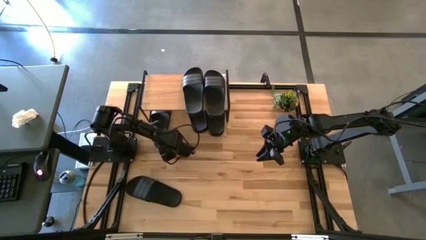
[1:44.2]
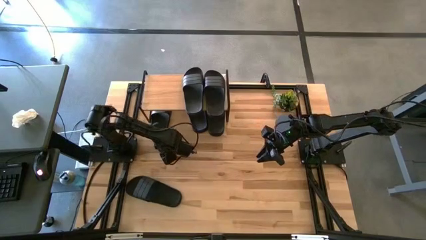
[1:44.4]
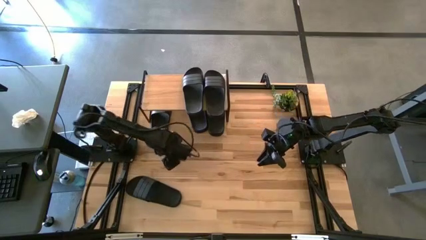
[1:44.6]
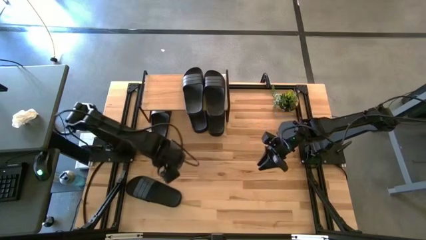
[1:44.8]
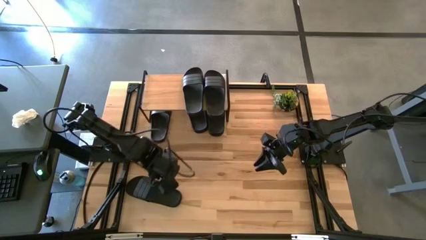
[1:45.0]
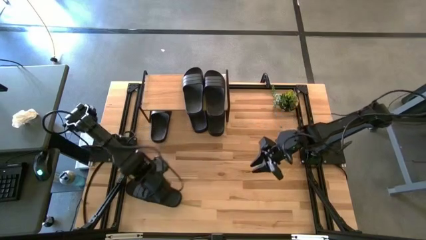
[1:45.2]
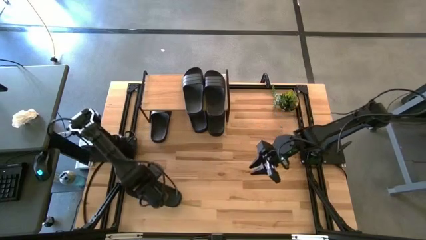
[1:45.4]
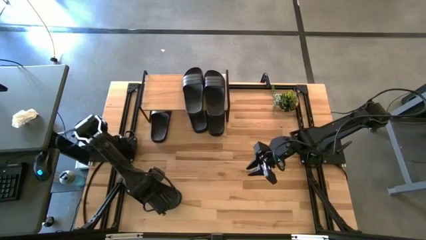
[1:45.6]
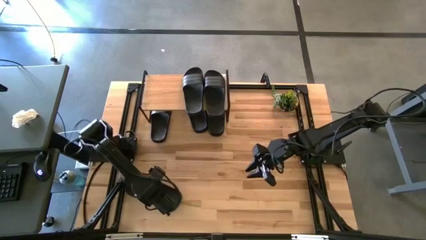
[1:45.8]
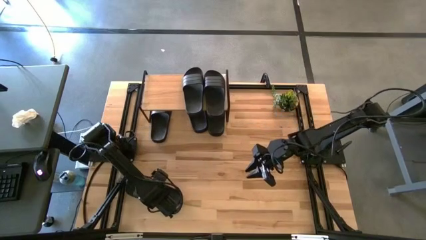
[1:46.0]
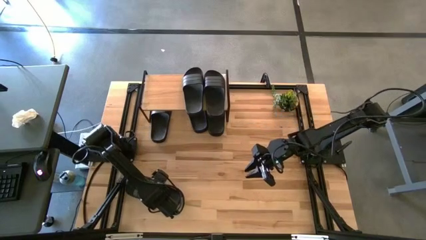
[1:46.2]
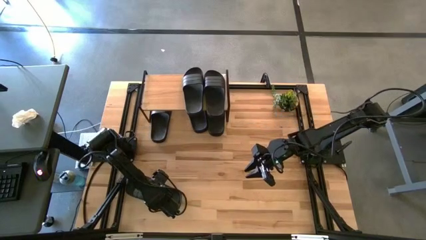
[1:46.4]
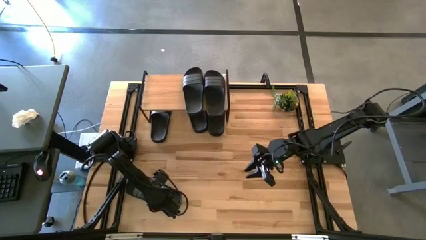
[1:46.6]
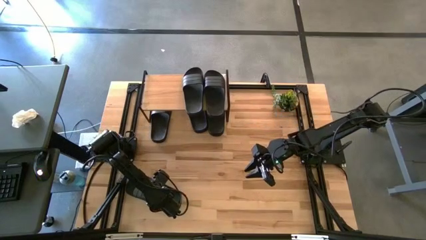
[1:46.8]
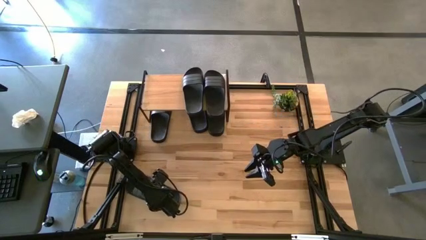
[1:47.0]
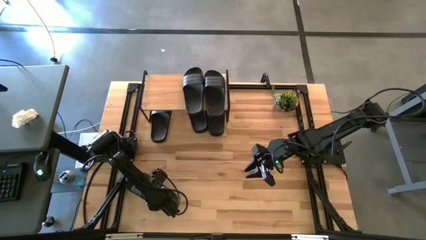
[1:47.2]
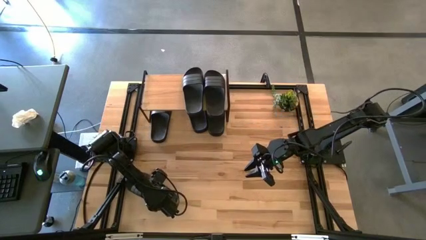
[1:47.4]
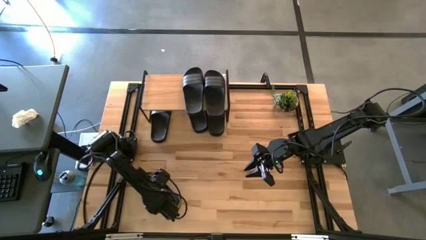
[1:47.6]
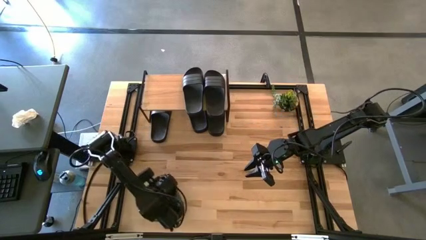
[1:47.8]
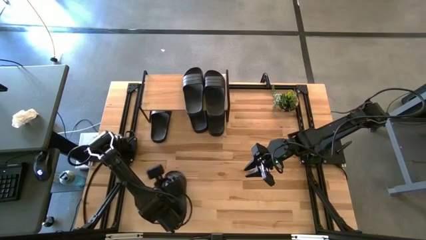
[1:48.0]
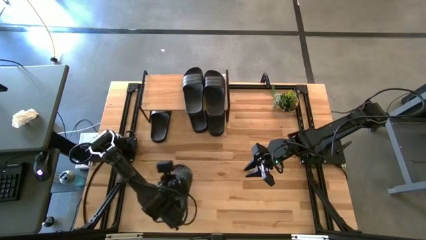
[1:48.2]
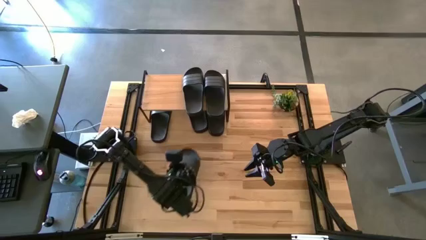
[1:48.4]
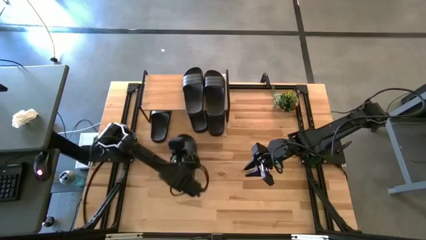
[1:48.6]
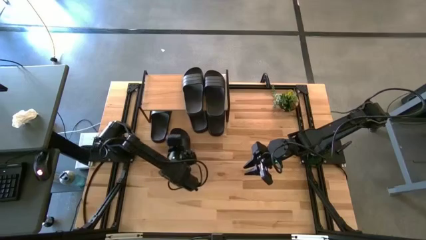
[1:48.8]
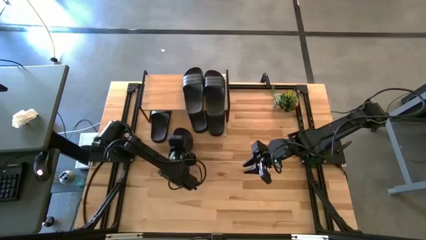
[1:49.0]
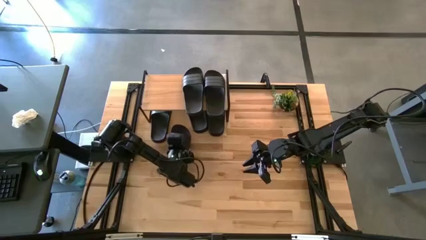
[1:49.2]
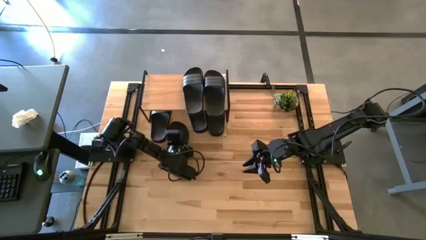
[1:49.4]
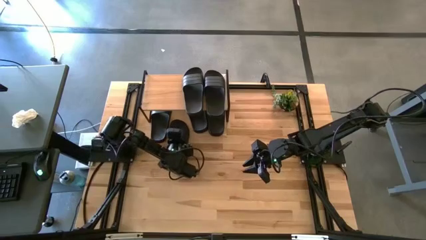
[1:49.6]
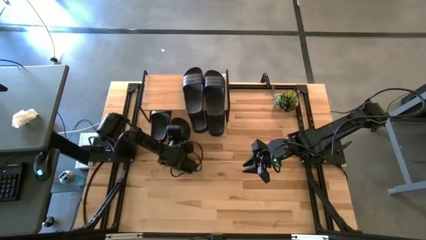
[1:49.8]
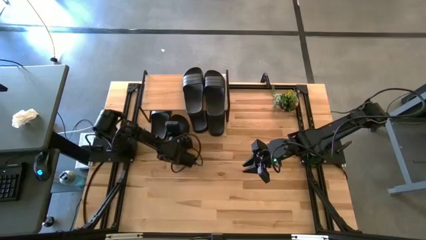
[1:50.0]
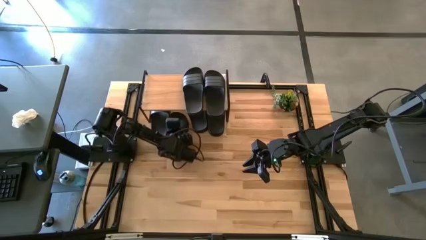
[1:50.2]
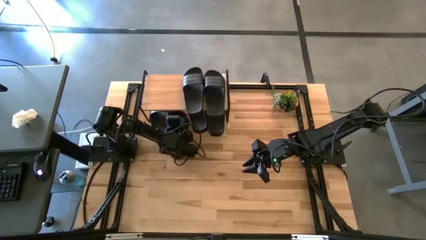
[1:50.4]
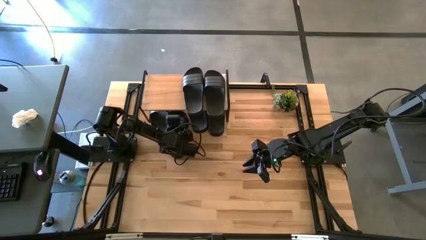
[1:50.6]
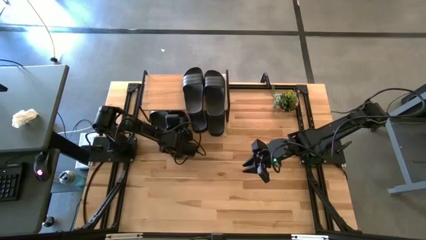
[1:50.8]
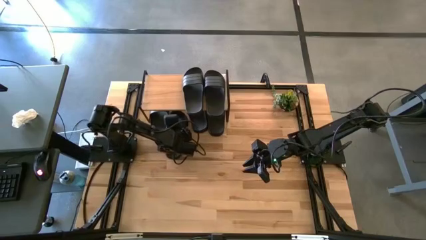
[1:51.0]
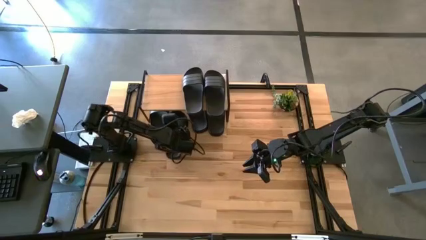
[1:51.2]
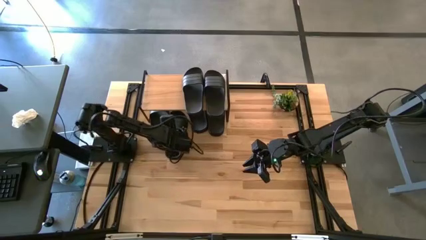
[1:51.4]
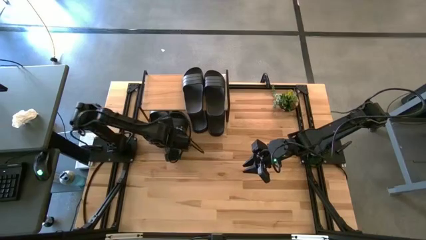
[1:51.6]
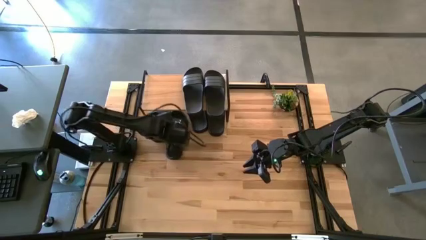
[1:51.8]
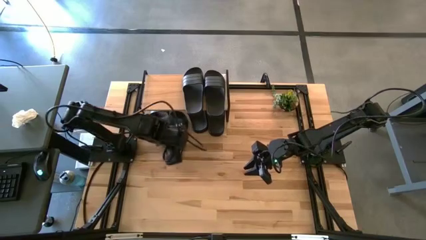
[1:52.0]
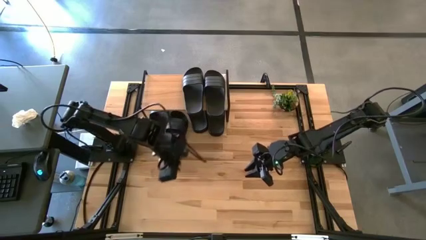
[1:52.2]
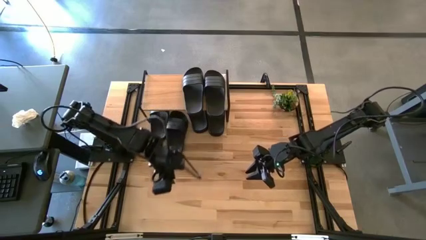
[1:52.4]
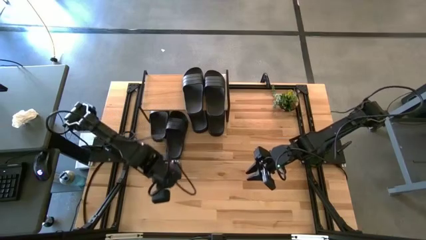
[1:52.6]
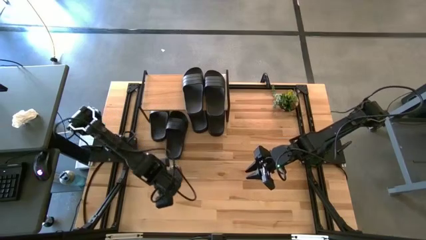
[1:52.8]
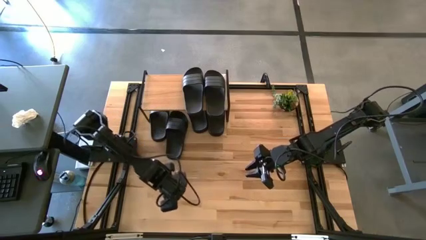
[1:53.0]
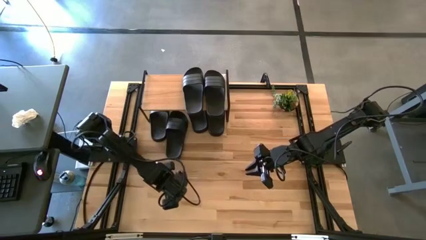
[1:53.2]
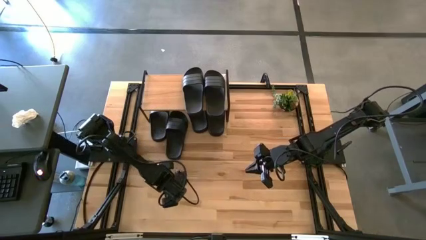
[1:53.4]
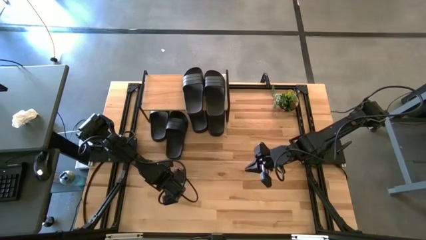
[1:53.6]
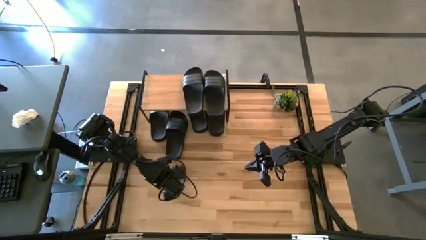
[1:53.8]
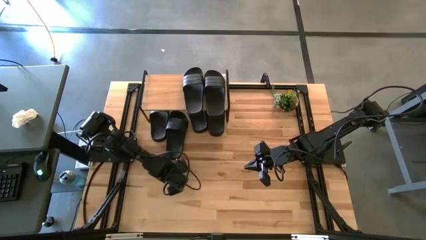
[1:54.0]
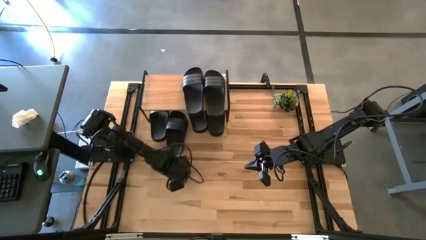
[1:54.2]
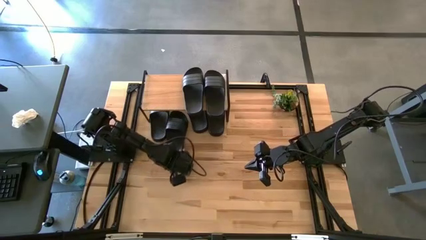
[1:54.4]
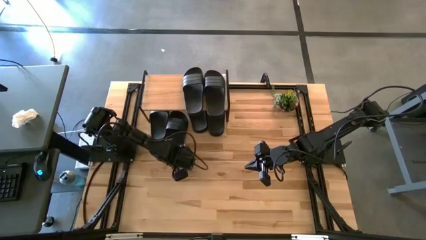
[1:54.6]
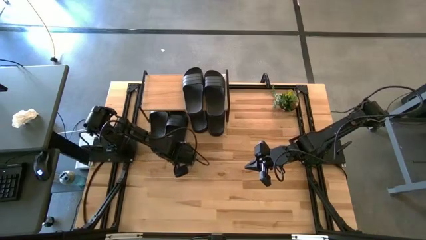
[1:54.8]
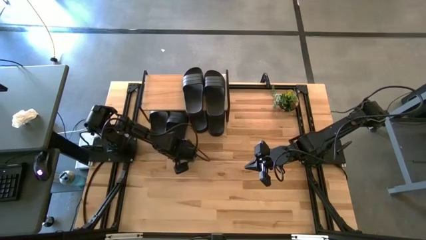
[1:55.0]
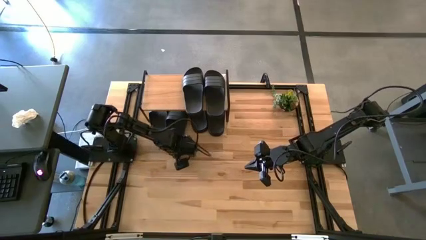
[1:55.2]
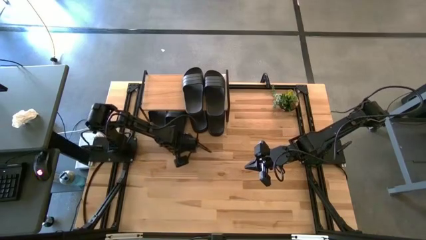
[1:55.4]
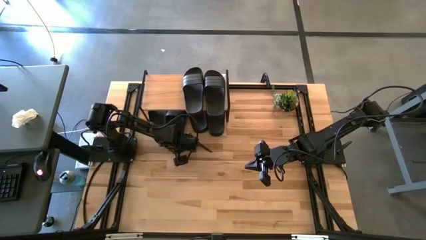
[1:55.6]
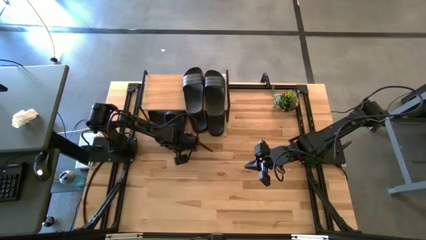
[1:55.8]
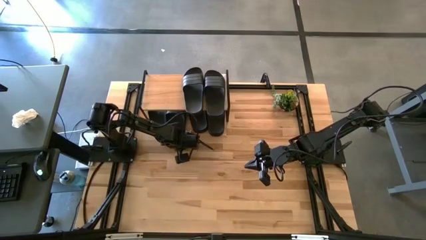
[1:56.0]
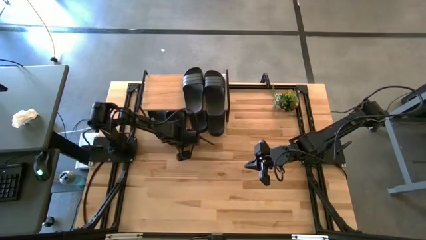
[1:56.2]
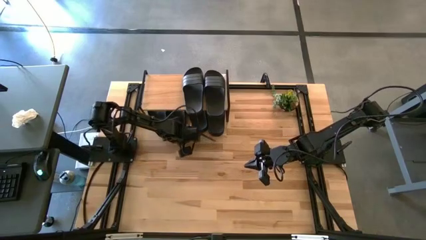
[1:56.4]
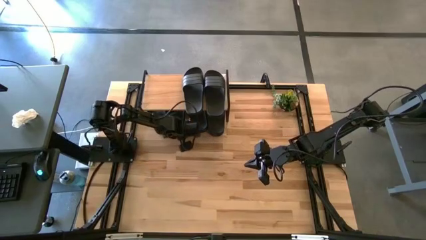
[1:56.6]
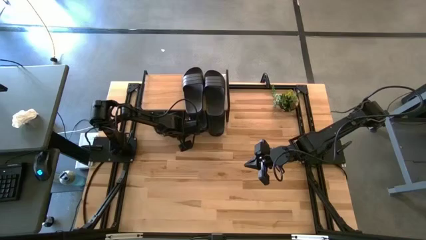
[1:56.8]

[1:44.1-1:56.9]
Task: Pick and place slides into the shelf
Put the black slipper under the shelf

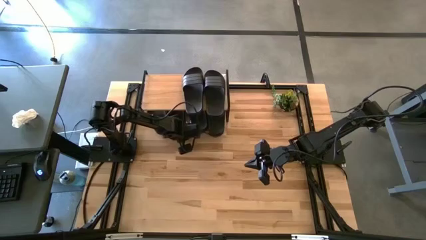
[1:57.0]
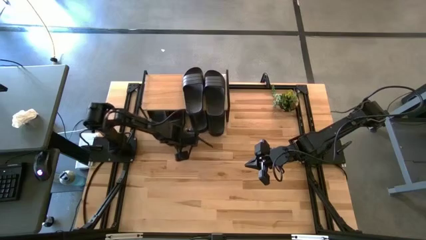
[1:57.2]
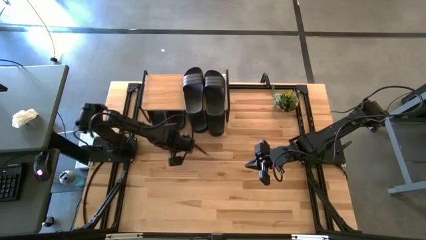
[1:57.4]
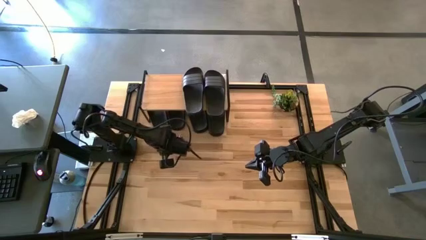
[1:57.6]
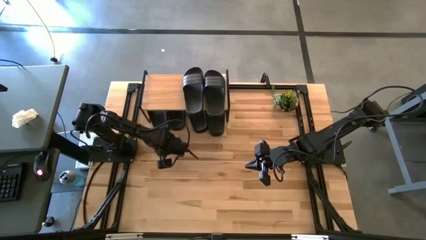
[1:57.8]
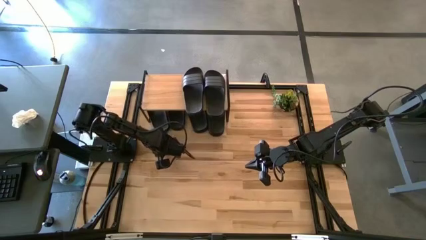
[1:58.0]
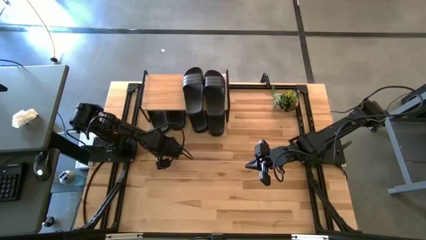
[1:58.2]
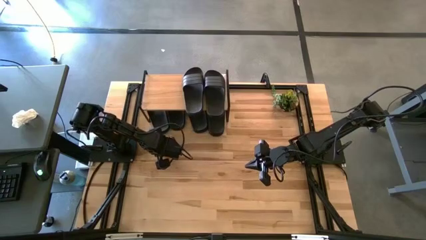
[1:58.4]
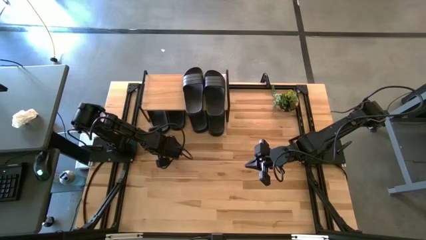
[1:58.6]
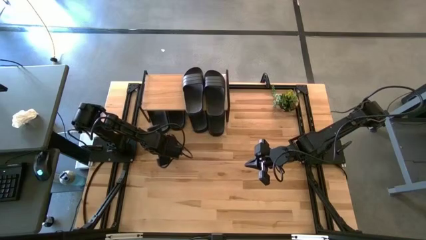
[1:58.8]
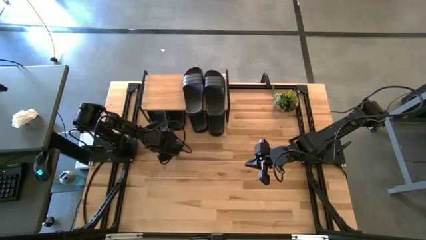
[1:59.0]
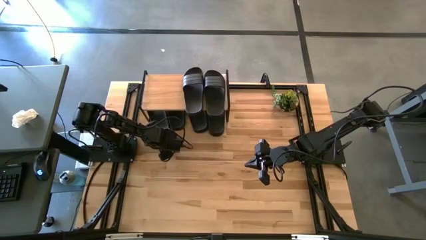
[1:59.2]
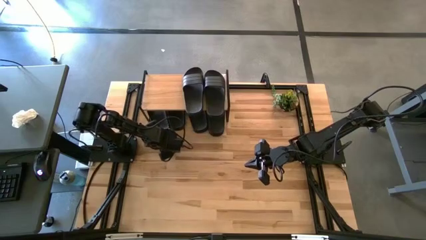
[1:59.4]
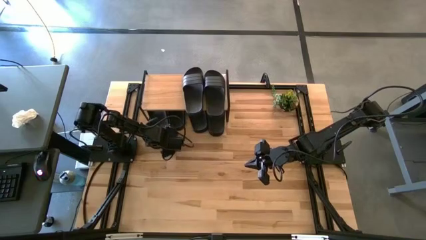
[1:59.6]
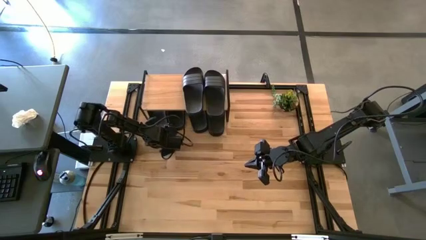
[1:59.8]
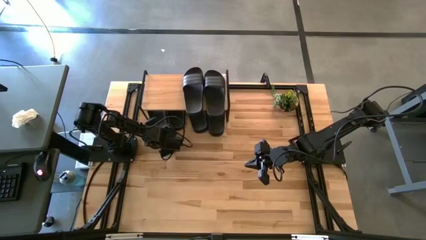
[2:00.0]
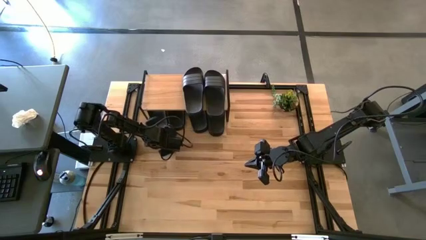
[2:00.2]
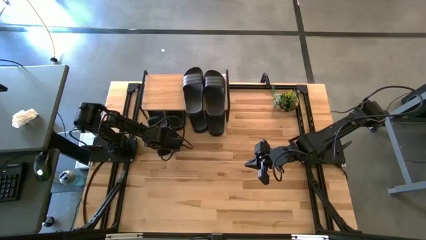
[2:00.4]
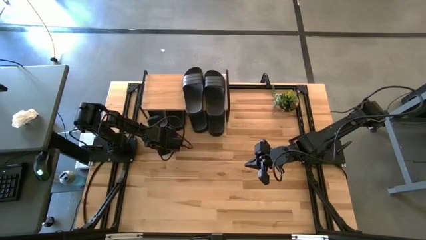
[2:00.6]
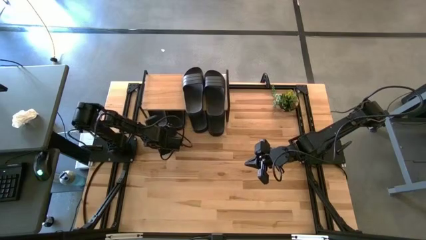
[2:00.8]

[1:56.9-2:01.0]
Adjust the black slipper under the shelf

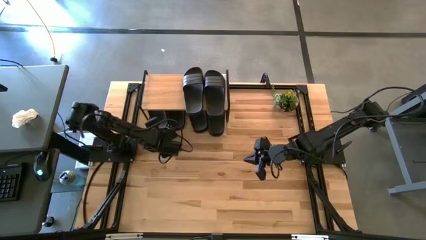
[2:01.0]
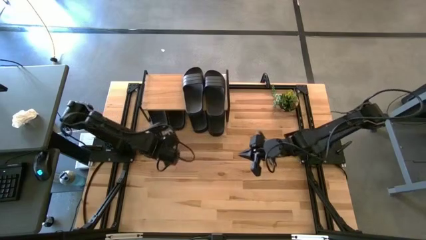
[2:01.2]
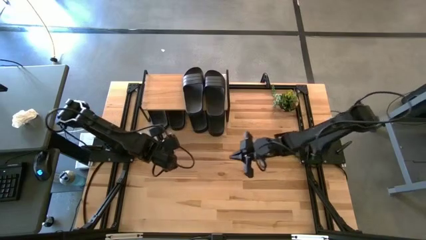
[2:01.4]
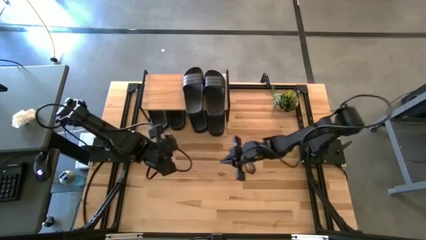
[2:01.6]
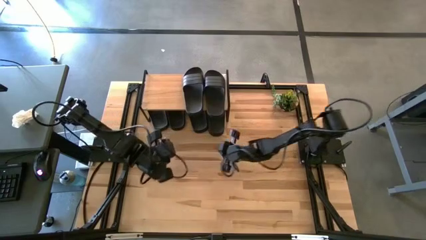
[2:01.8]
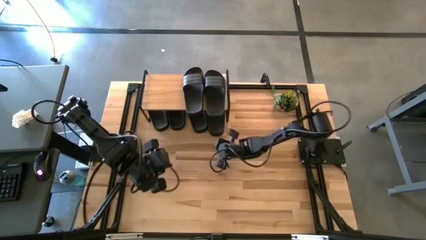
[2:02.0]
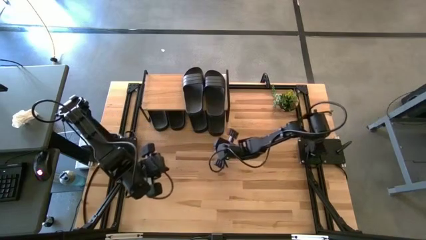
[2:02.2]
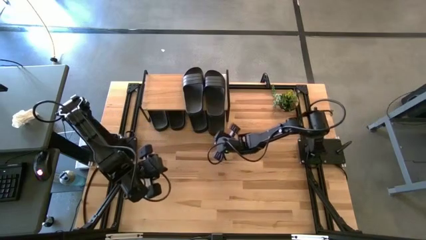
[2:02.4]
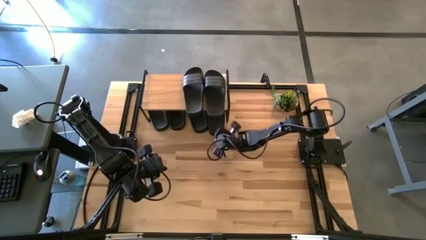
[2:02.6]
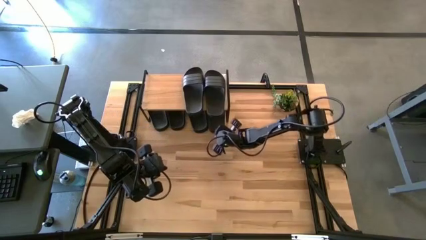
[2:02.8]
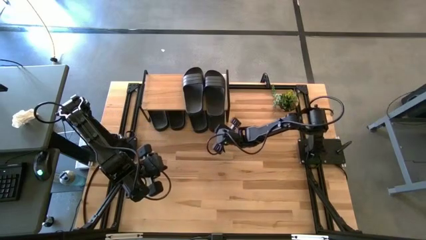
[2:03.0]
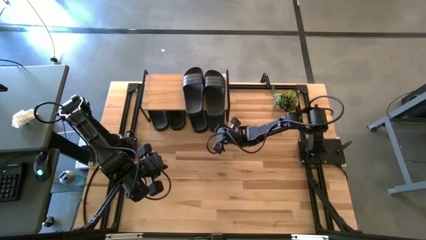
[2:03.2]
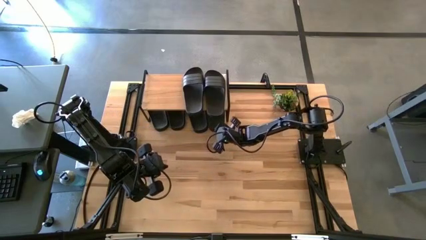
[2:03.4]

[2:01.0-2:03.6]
Adjust the black slipper under the shelf
